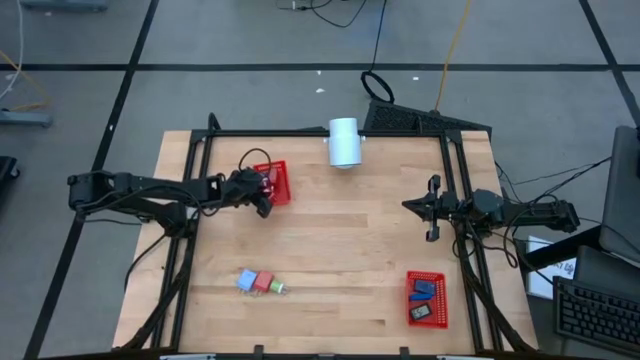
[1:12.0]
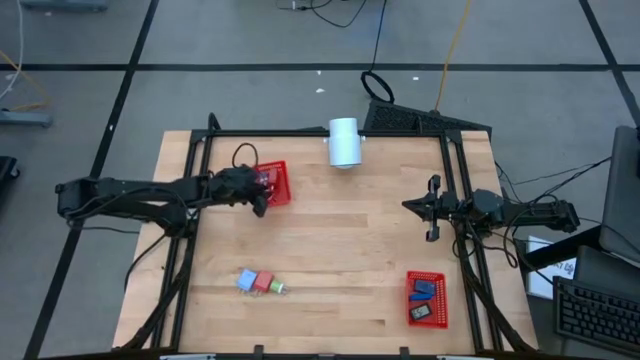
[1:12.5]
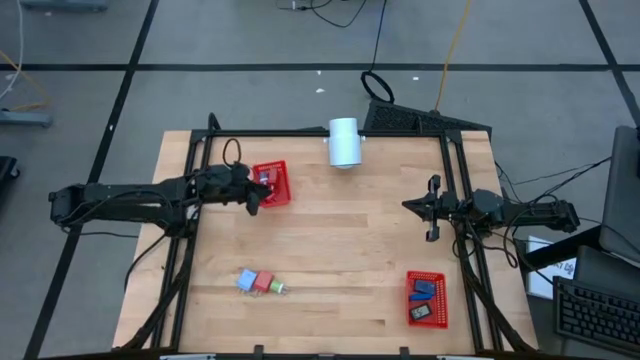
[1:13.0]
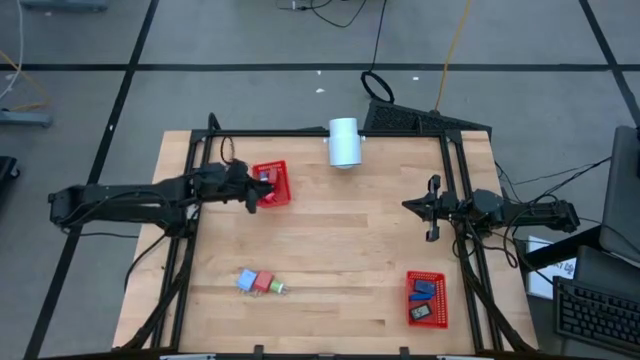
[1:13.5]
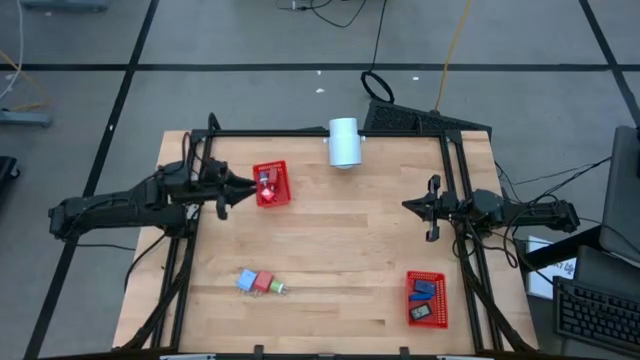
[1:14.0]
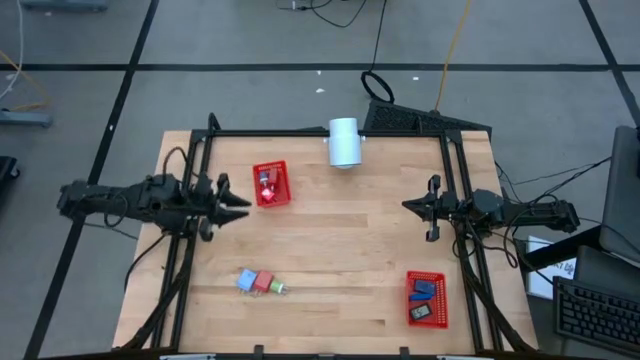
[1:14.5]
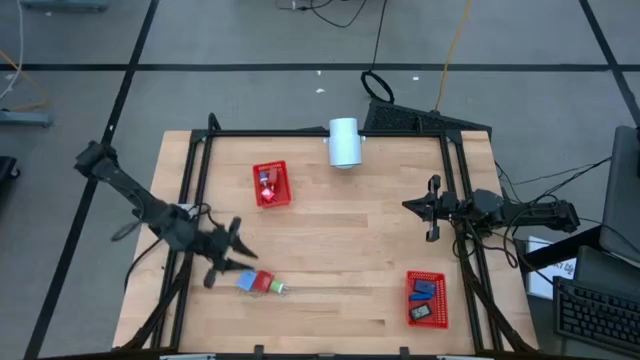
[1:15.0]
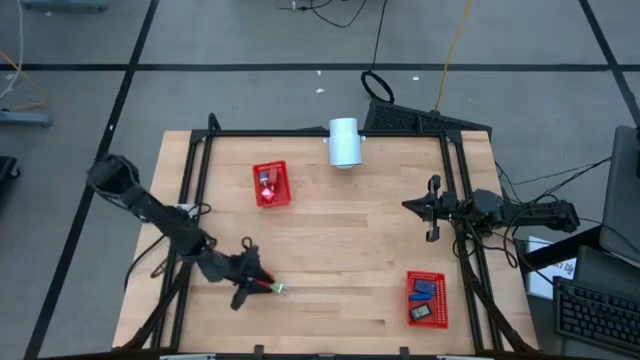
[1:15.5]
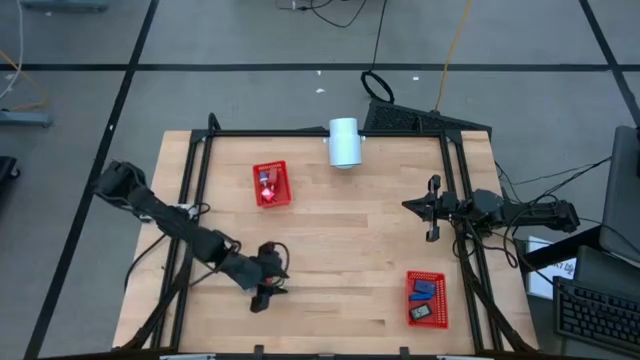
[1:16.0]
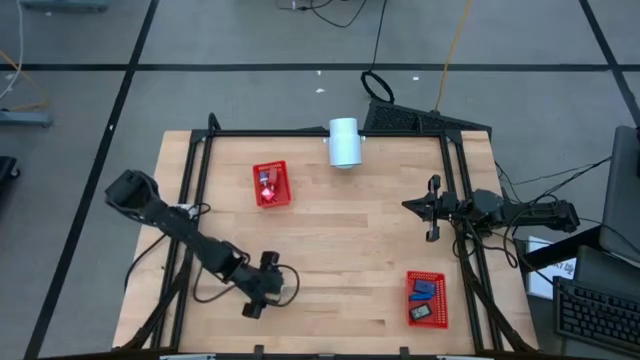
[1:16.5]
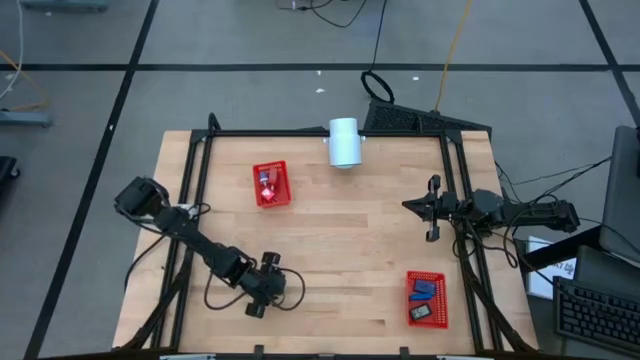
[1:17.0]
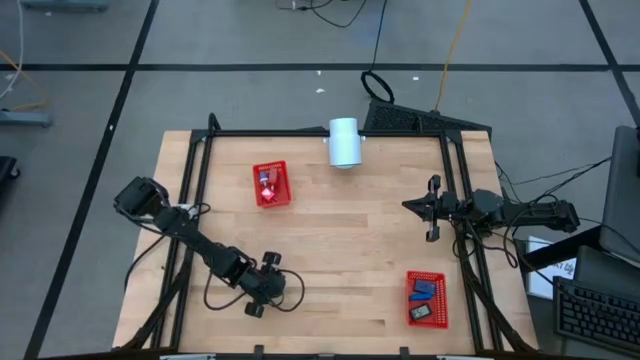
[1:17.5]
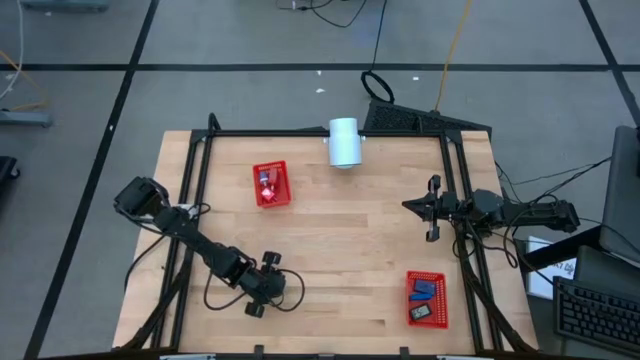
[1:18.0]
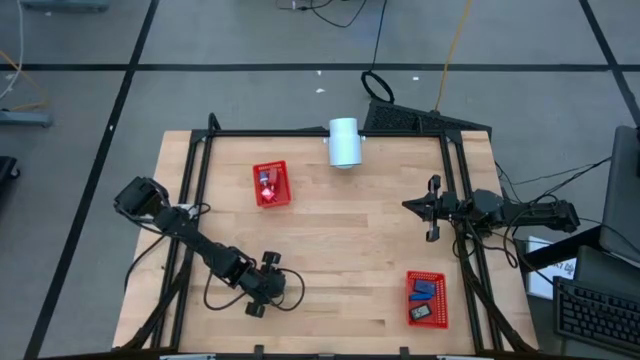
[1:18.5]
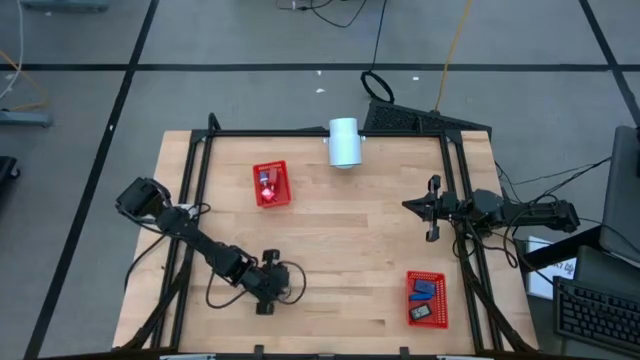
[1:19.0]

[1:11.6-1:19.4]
Task: Pick & Place Office items
Put the green charger adapter into the top red bin

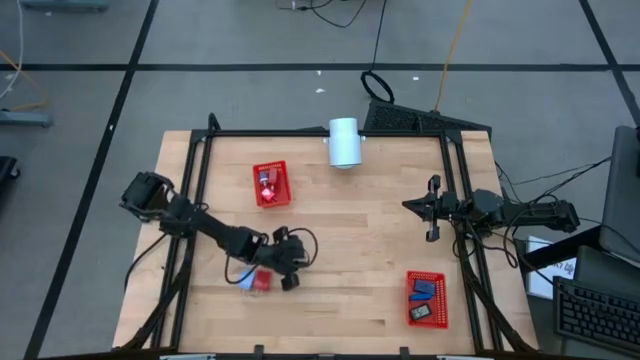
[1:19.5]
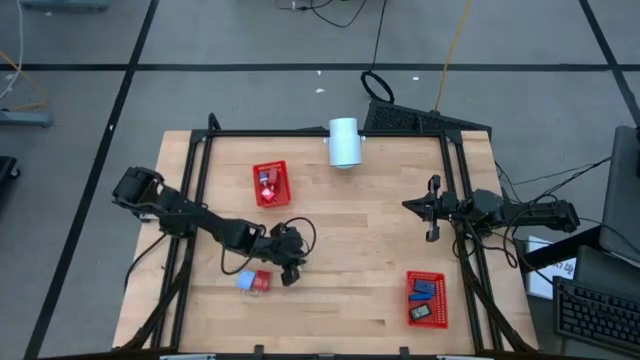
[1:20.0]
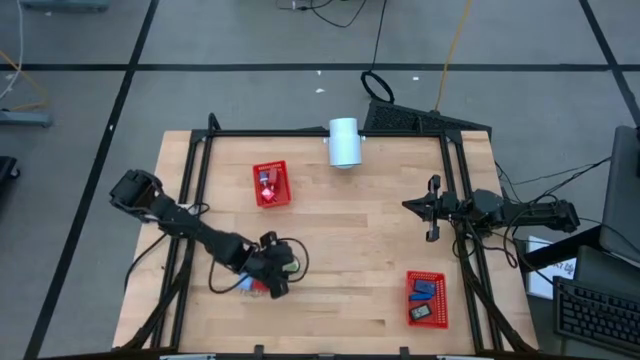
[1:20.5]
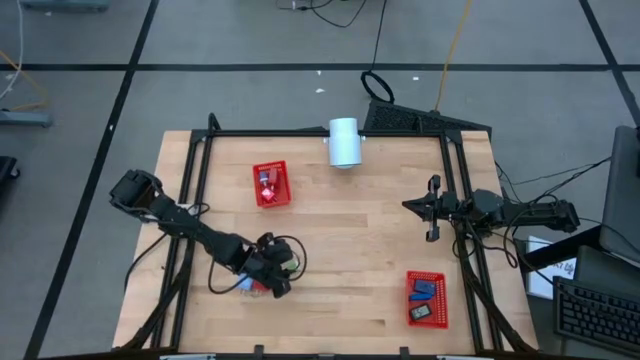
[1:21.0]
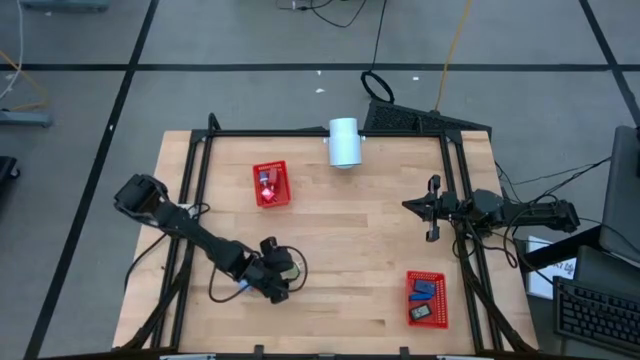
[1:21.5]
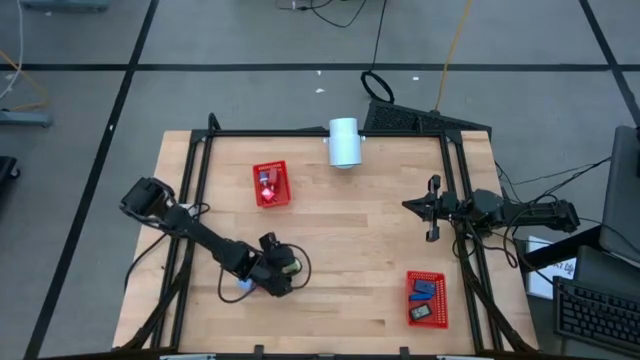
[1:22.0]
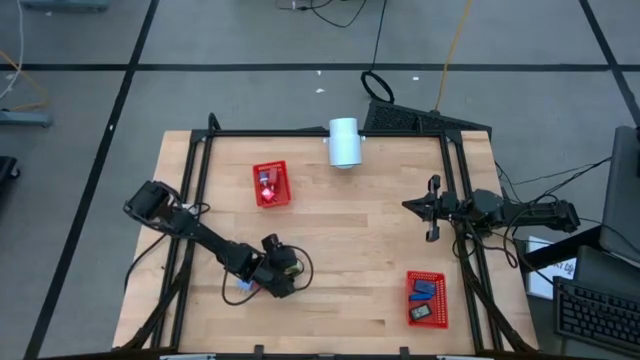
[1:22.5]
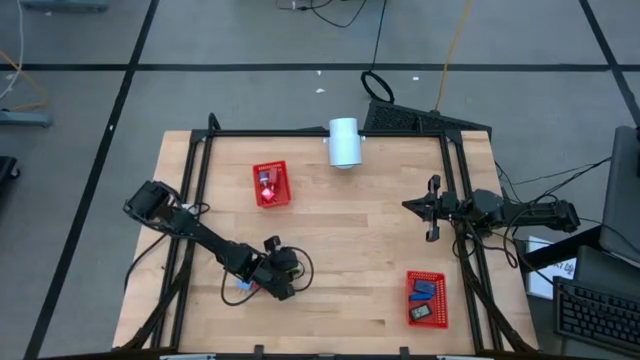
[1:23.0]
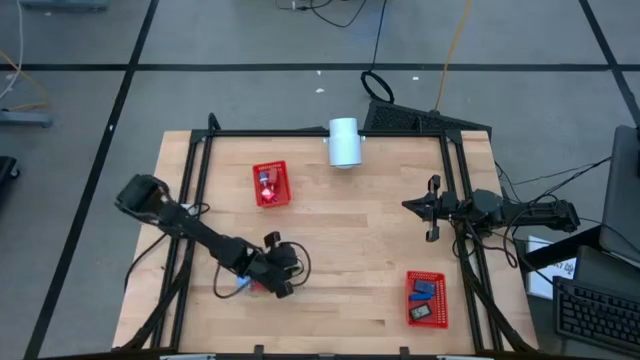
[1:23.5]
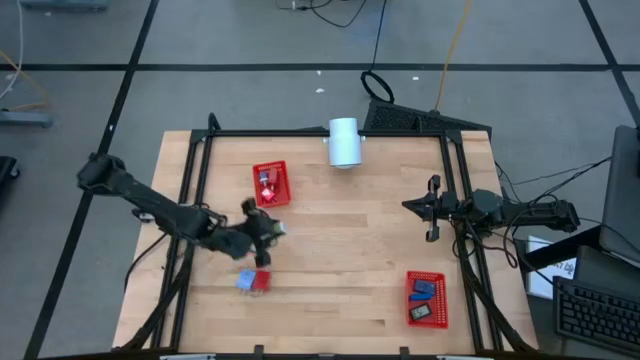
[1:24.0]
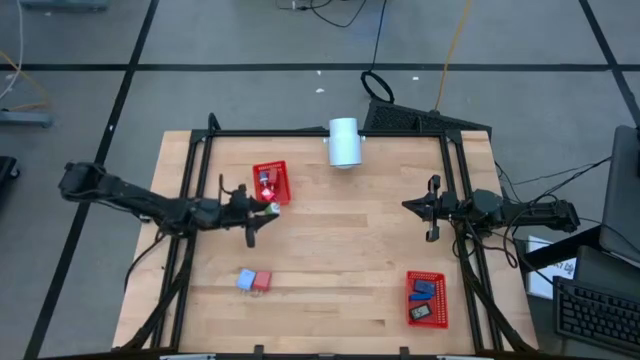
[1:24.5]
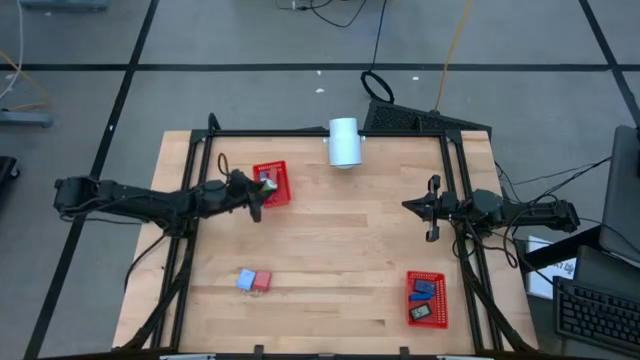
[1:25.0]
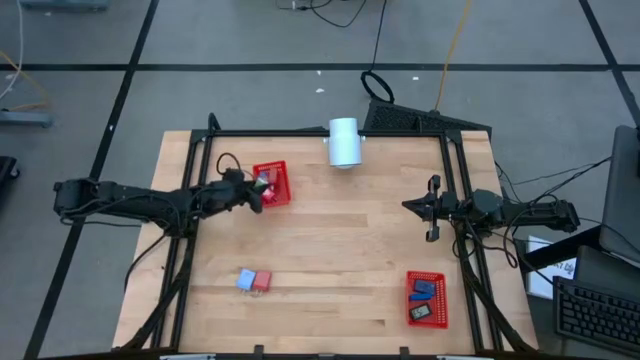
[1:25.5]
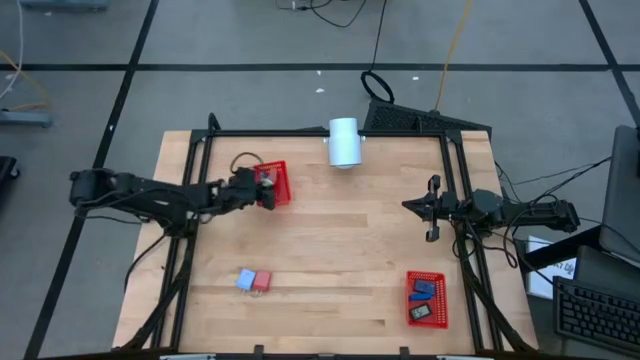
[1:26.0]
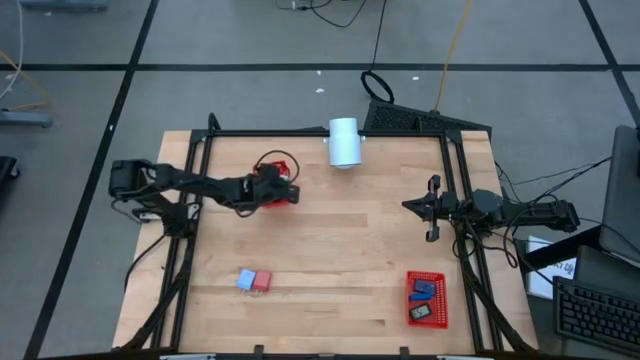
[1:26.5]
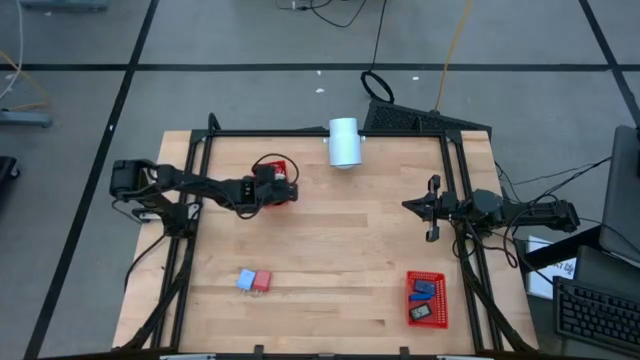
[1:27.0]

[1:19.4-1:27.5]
Put the green charger adapter into the top red bin

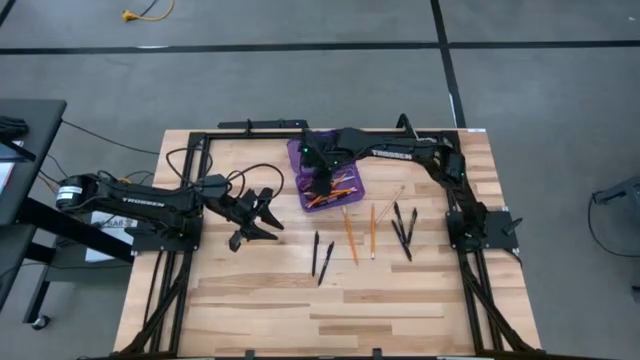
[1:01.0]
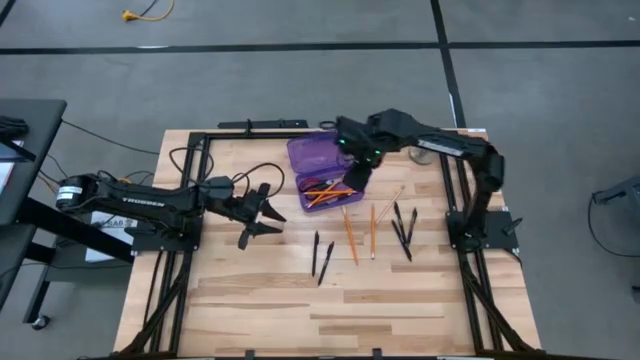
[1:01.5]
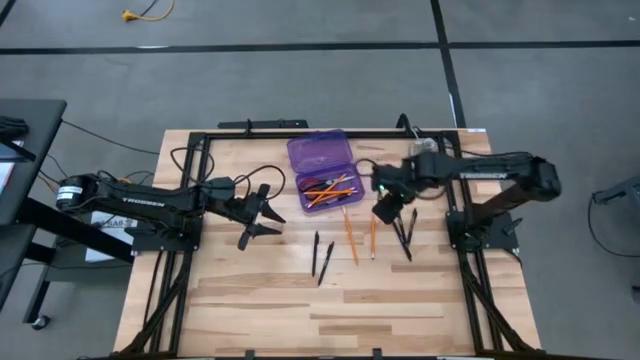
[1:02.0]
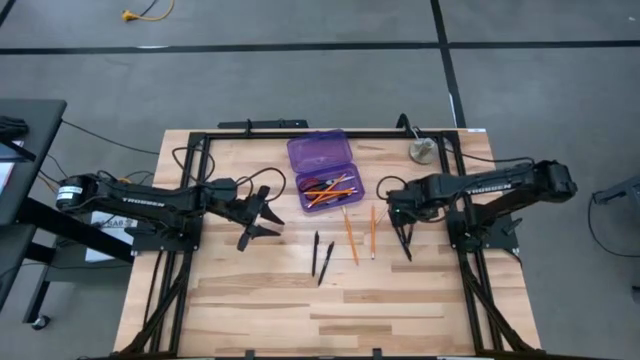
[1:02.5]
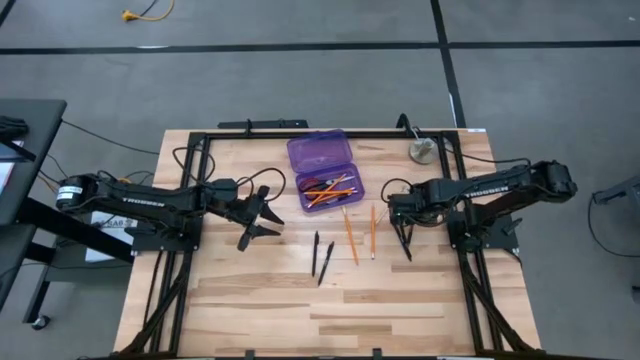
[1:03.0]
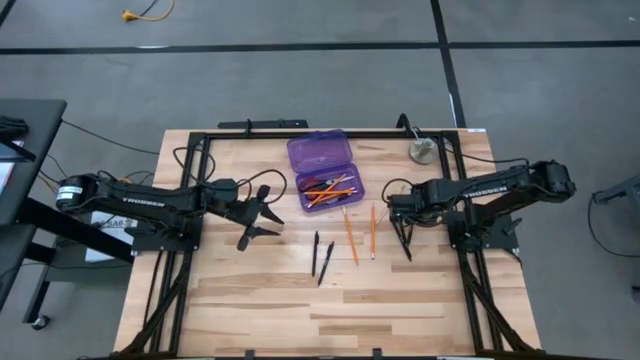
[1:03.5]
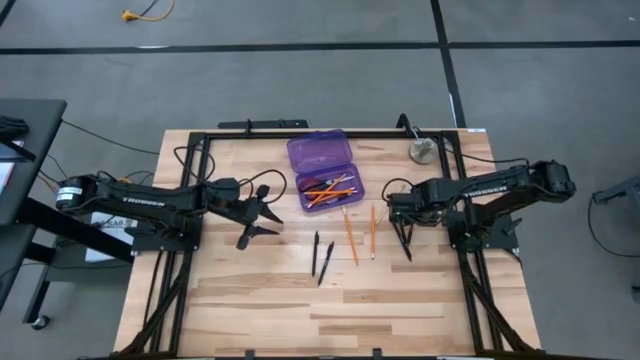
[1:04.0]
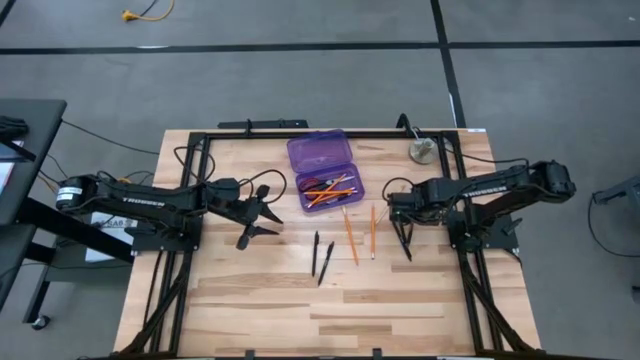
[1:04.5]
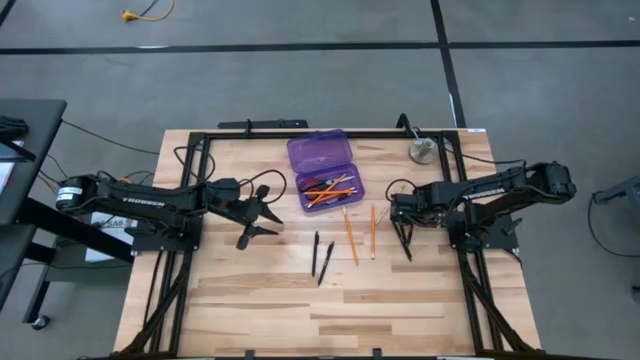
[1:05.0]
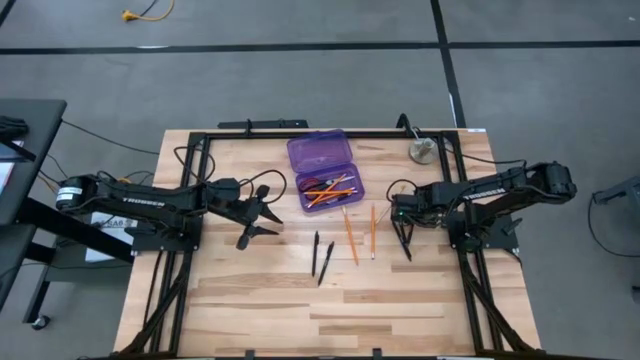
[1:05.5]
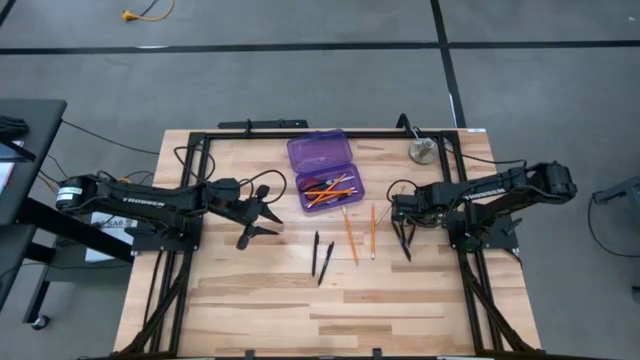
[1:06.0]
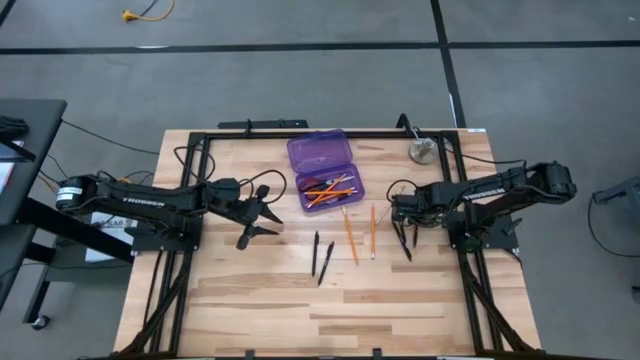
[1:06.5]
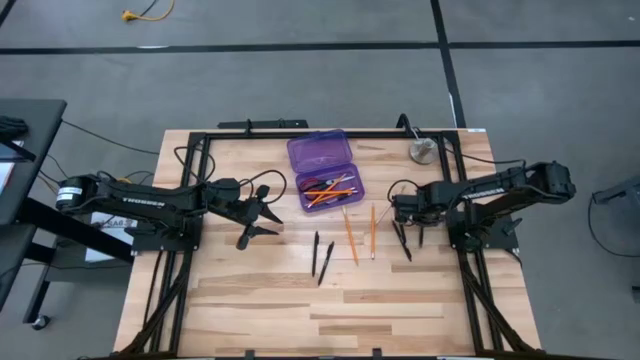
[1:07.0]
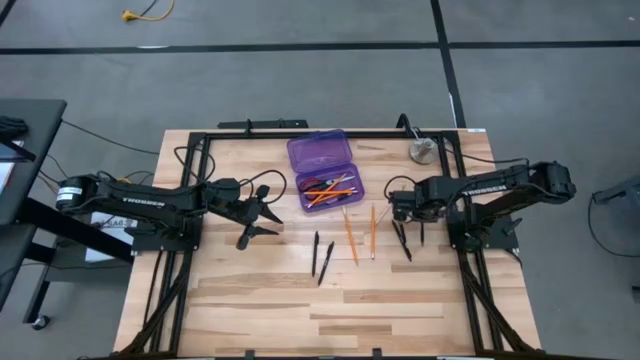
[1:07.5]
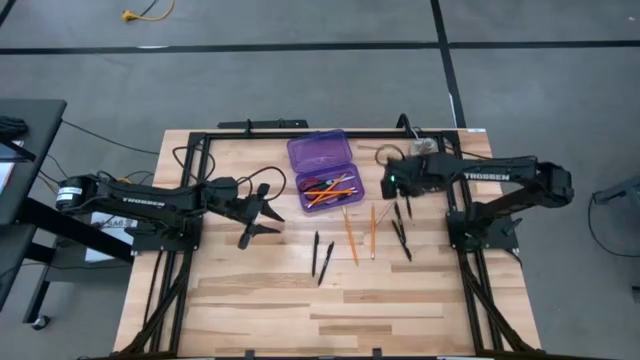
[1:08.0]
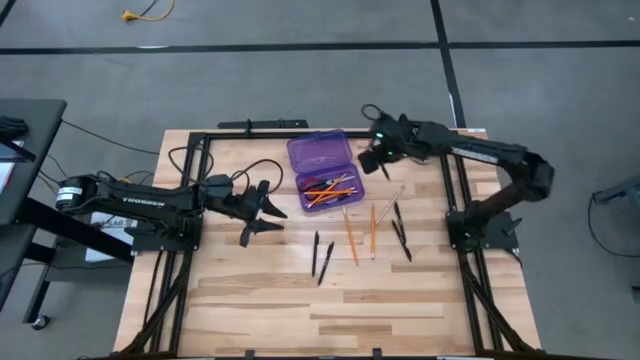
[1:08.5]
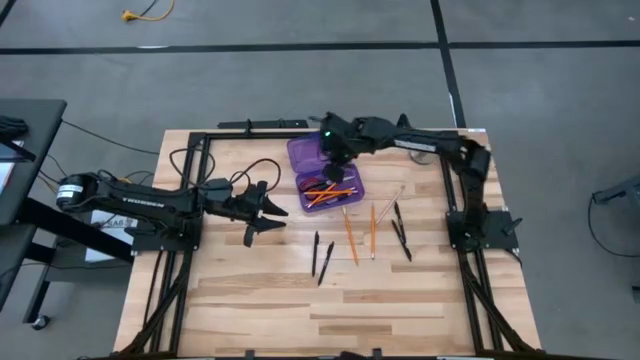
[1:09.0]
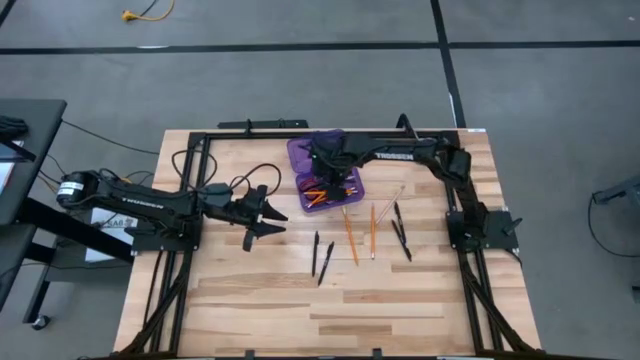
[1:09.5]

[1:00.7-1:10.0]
Task: Pick & place school supplies into a supply box
Put the black pen into the purple supply box
